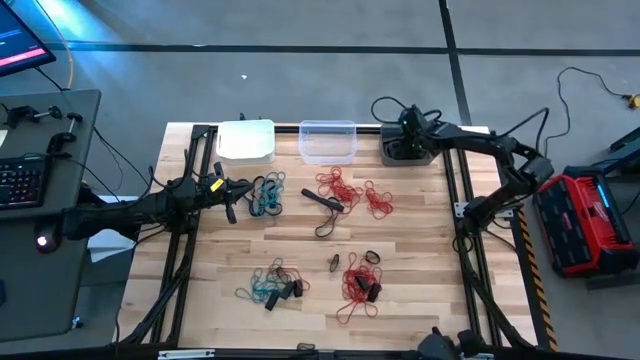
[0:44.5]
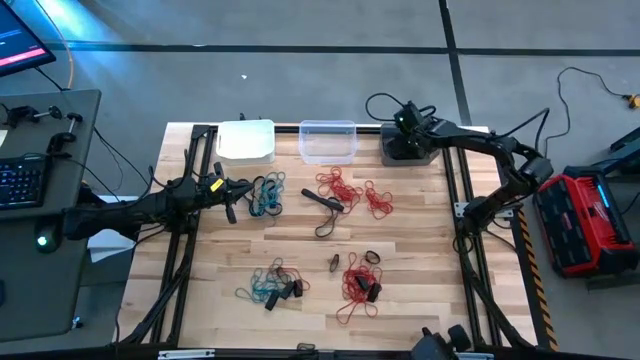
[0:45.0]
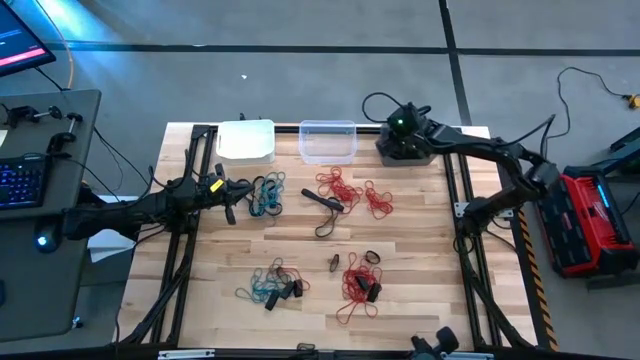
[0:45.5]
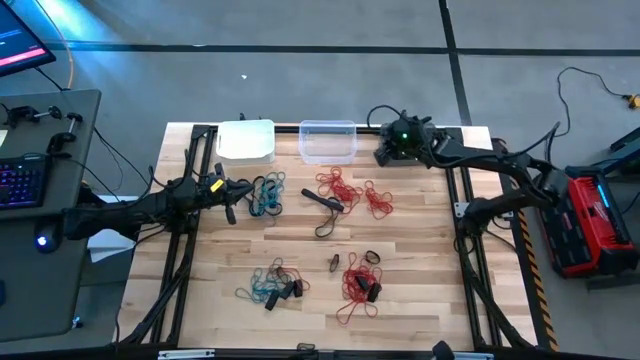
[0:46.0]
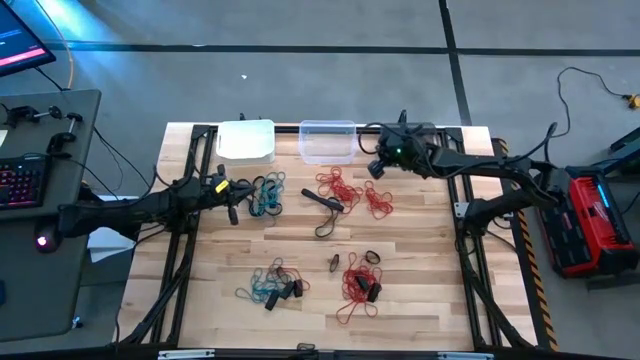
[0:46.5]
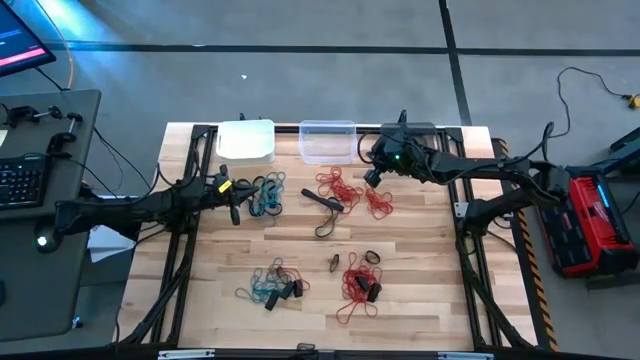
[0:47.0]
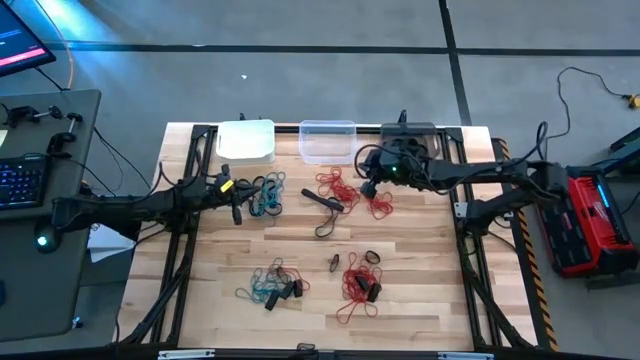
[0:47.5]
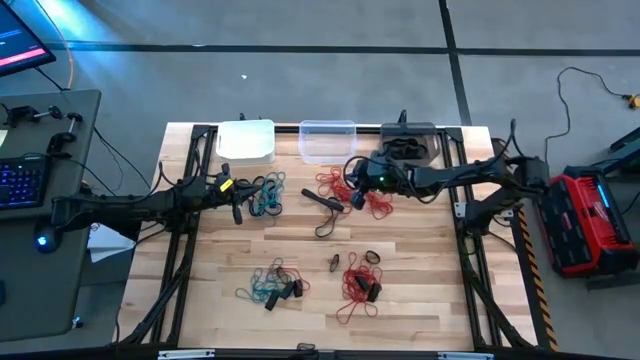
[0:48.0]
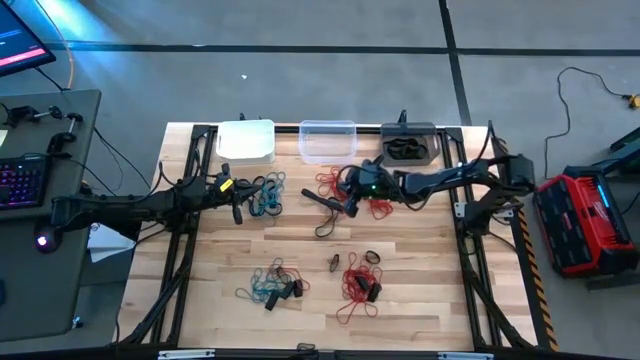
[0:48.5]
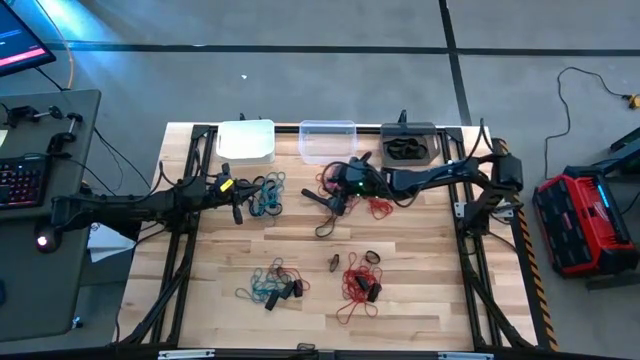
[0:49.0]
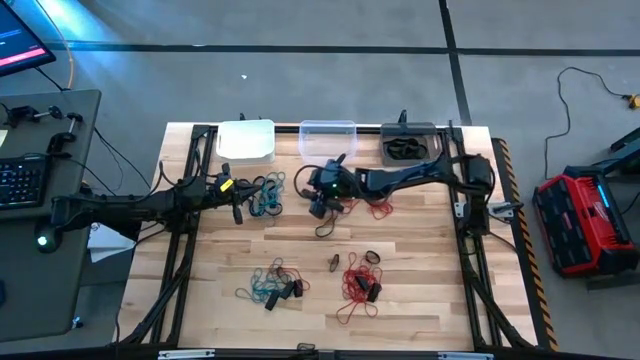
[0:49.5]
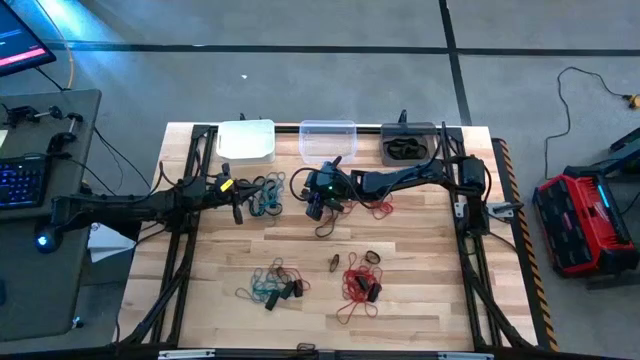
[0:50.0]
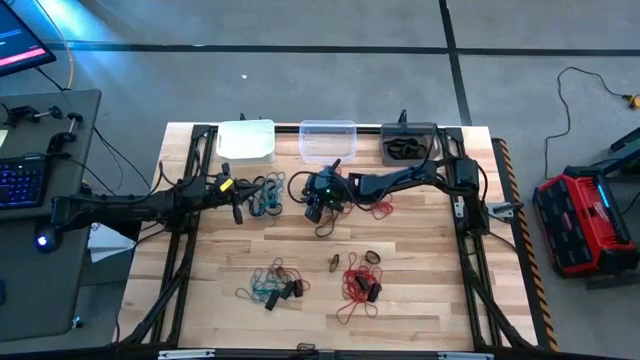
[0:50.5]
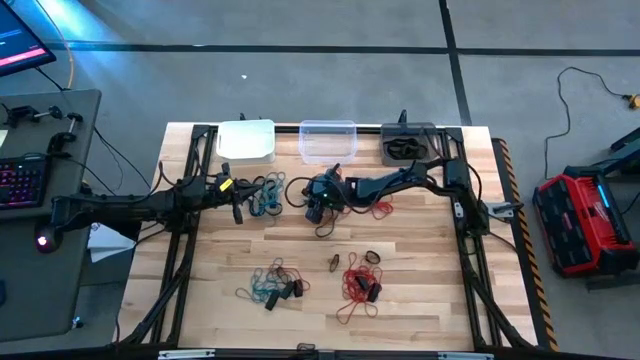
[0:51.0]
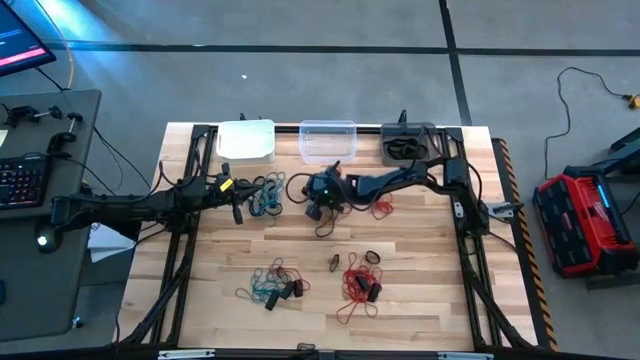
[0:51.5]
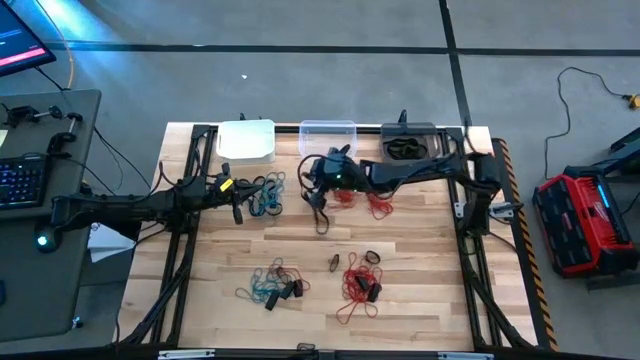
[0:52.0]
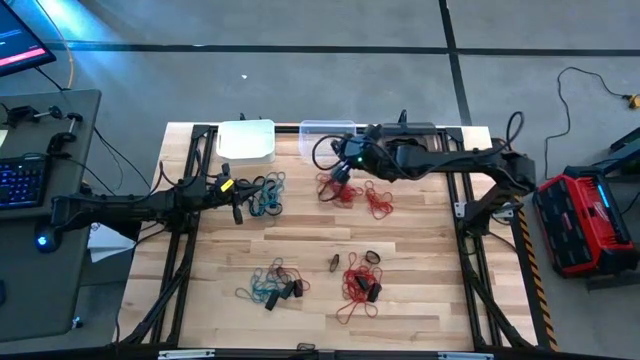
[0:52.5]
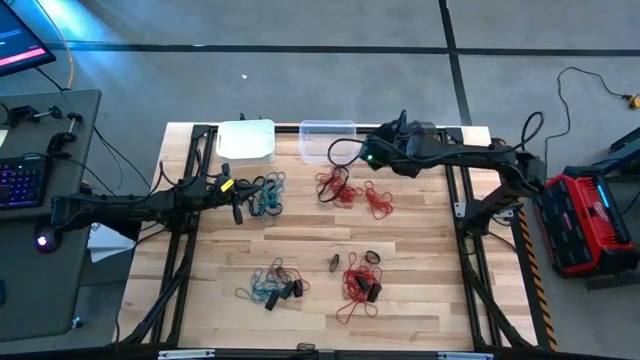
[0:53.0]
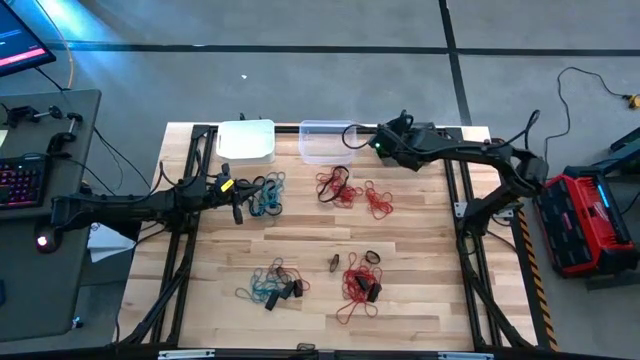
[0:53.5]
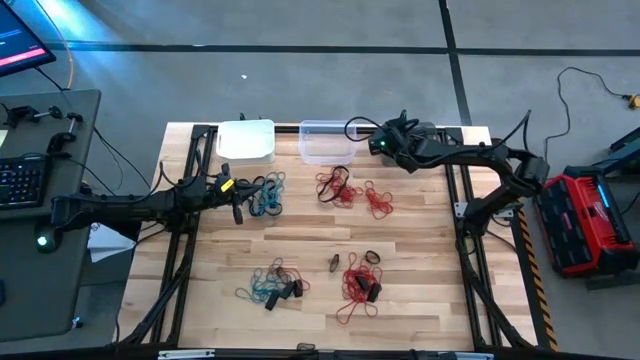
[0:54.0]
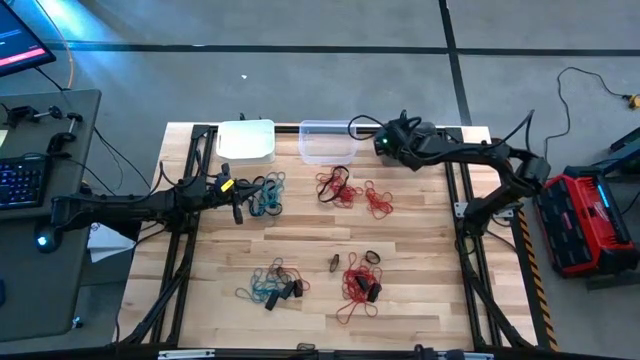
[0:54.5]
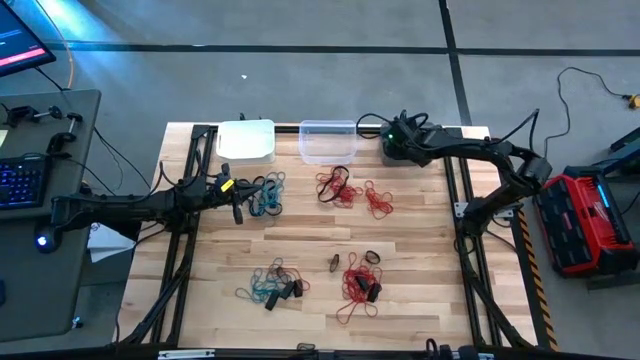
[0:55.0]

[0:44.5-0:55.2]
Task: Sort rubber bands into baskets
Put the black rubber band into the black bin

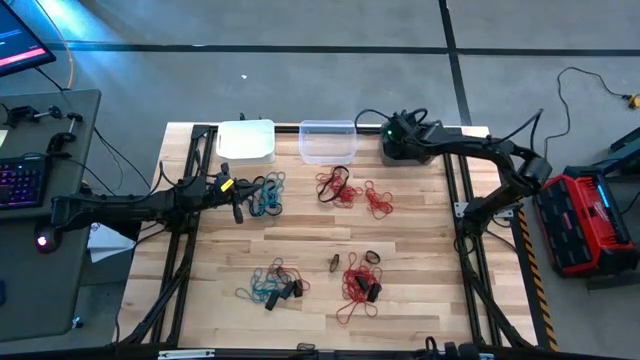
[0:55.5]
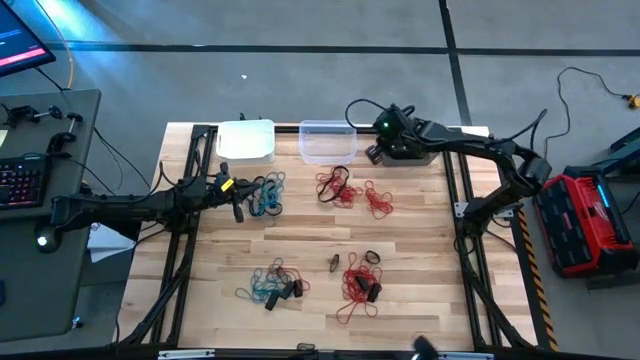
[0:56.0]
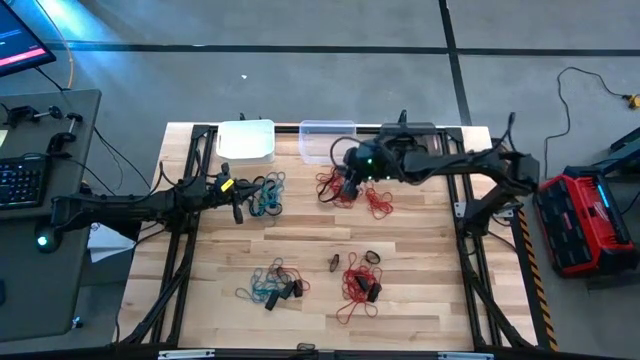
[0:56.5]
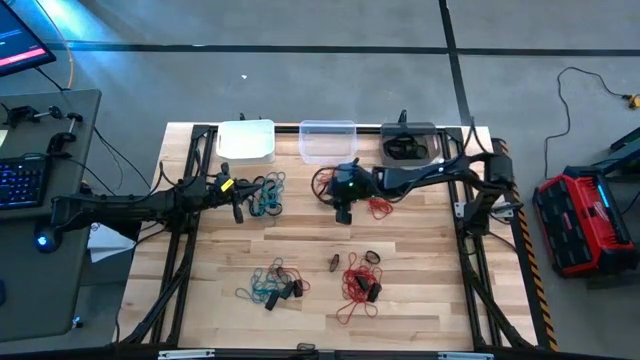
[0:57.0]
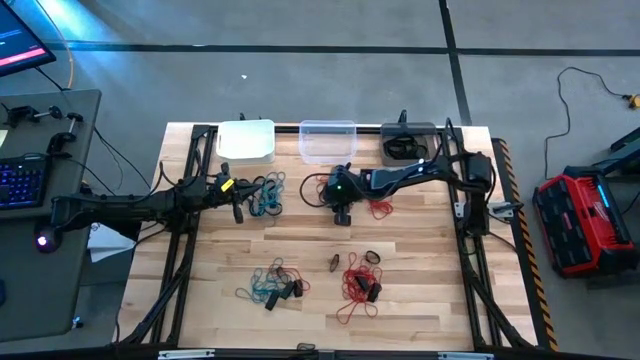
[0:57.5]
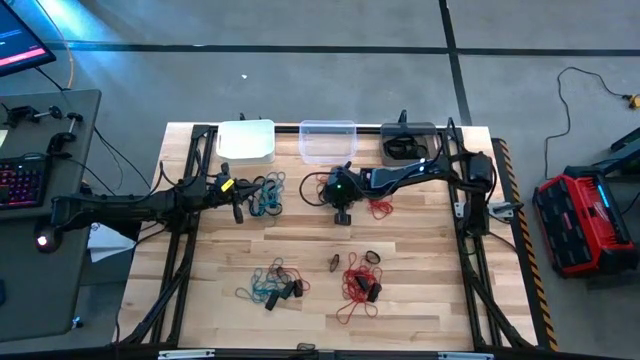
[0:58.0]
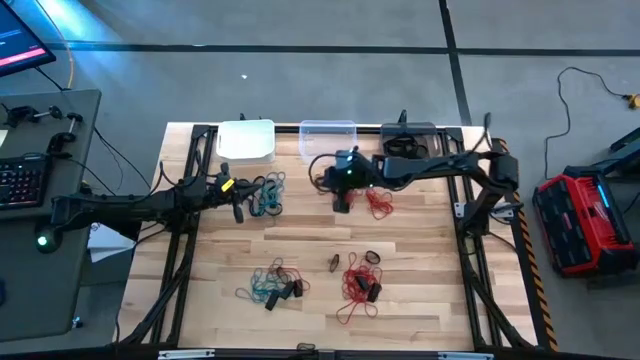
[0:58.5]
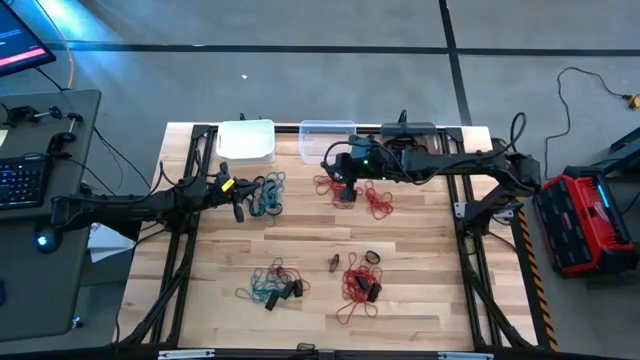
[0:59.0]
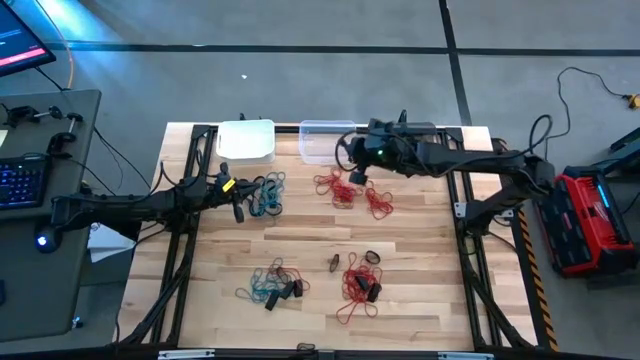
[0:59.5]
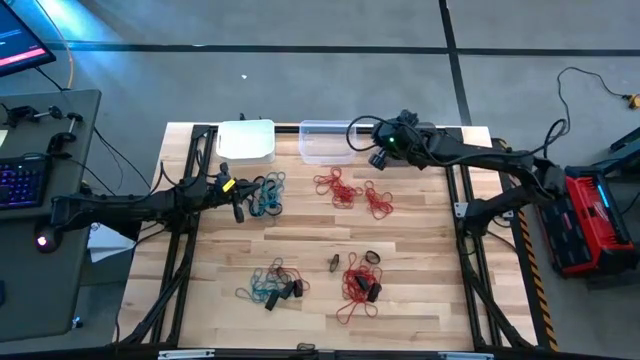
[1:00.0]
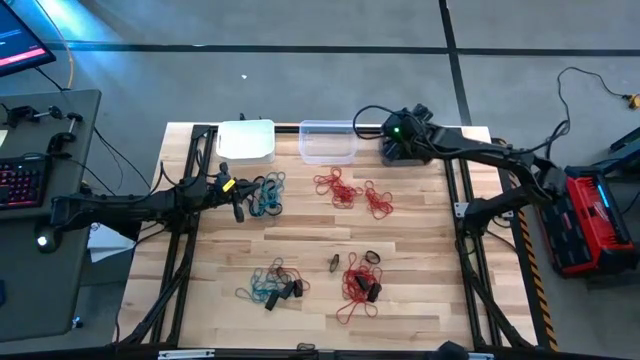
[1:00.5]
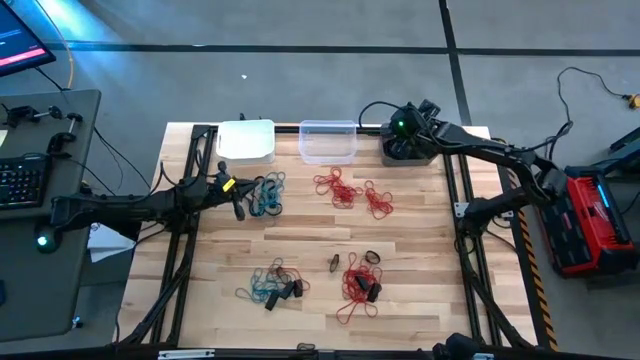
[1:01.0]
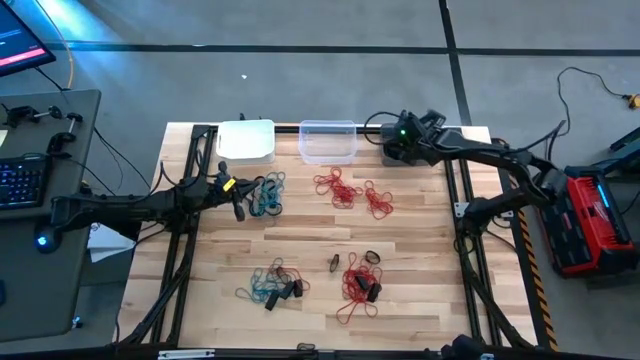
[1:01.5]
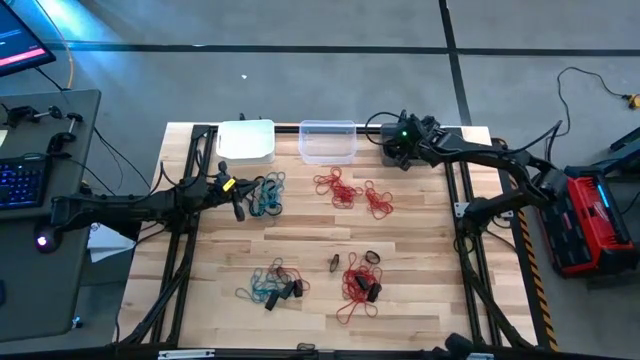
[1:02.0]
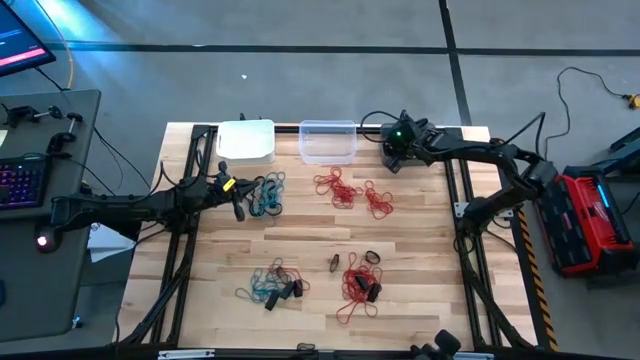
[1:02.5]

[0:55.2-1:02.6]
Put the black rubber band into the black bin

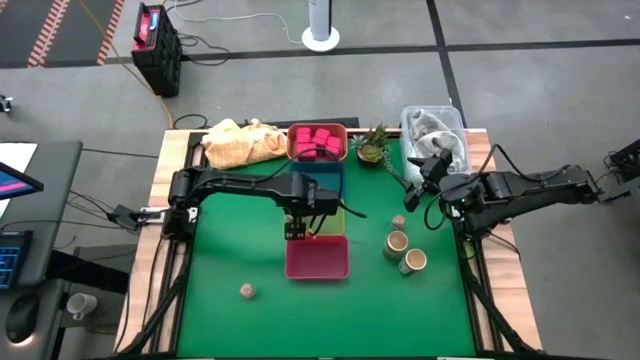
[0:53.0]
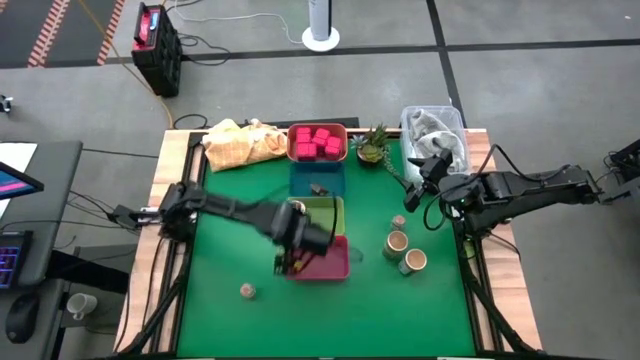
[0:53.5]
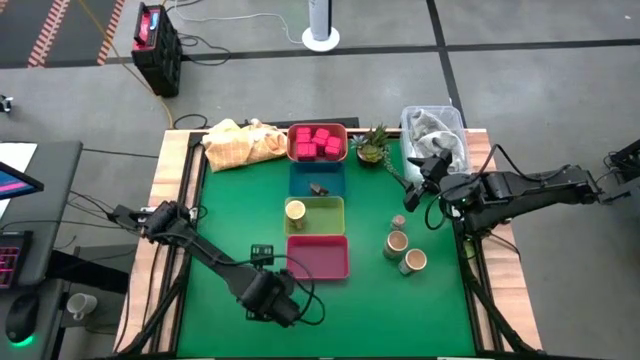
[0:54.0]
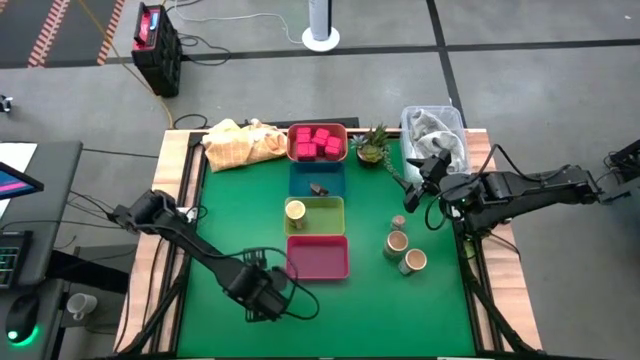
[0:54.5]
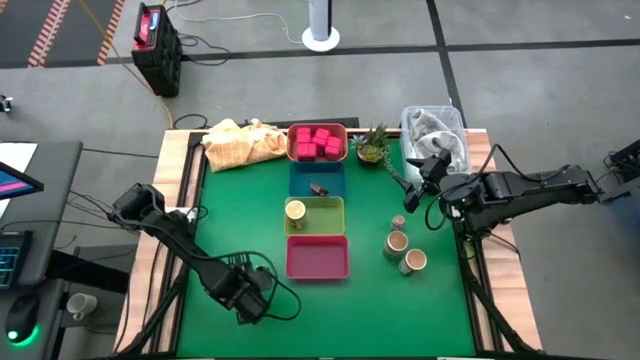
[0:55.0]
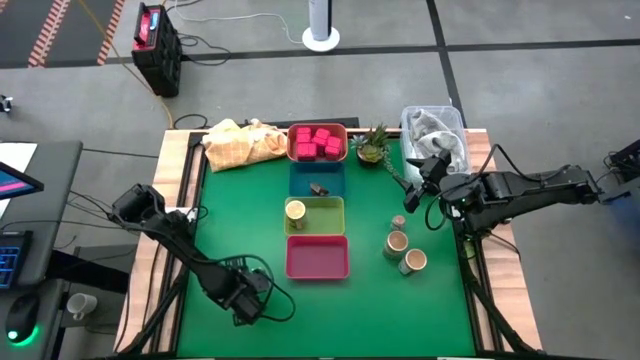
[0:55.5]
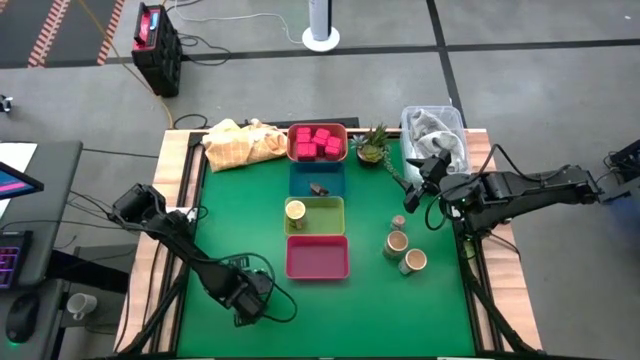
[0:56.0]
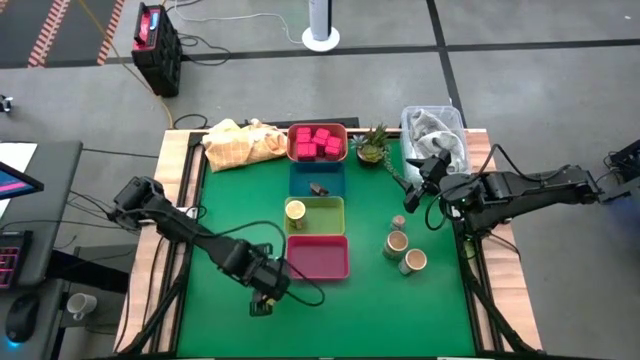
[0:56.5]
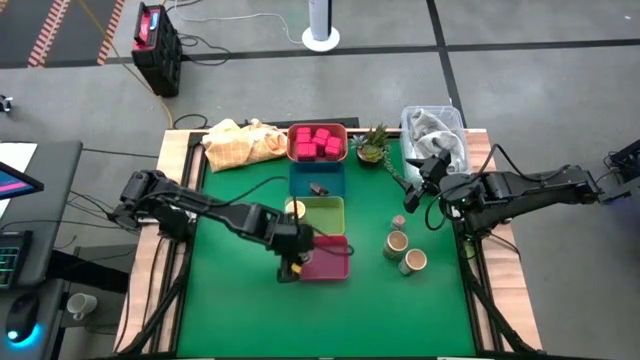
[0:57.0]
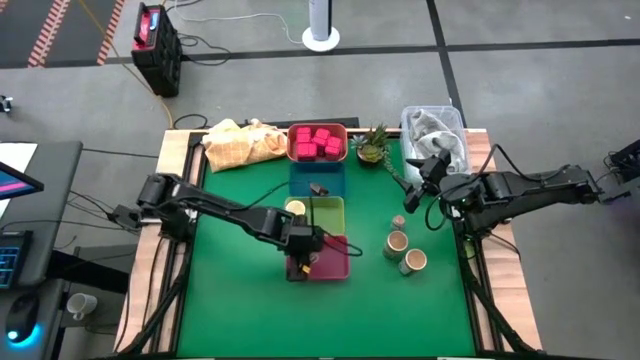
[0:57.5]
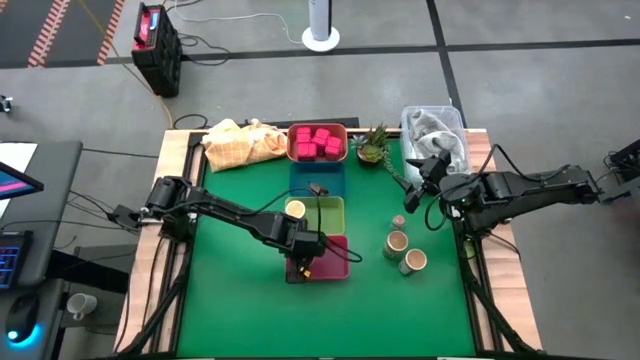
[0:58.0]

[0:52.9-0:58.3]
Task: Sort spices by type
Put the left brown seasoning bottle into the red bin
